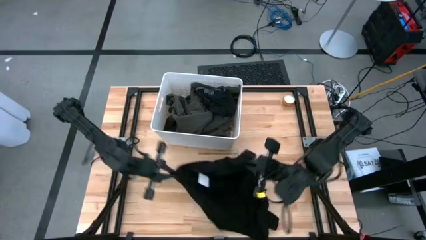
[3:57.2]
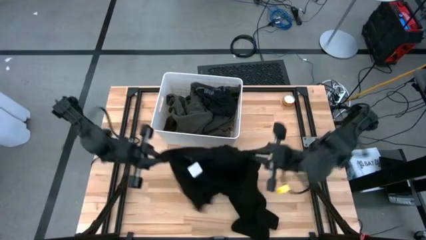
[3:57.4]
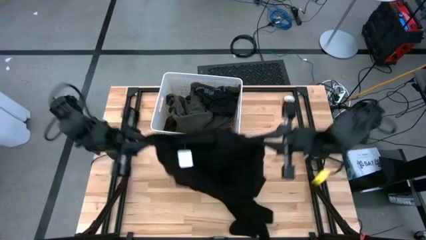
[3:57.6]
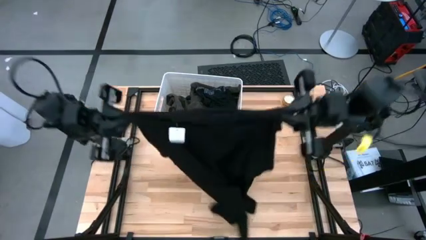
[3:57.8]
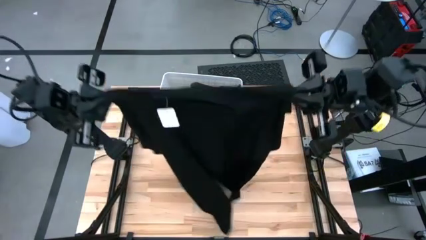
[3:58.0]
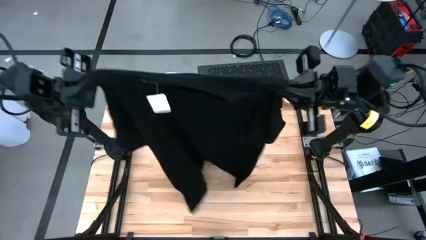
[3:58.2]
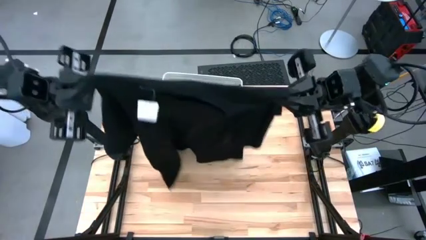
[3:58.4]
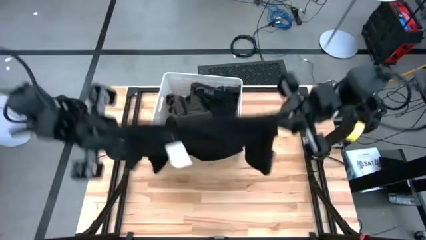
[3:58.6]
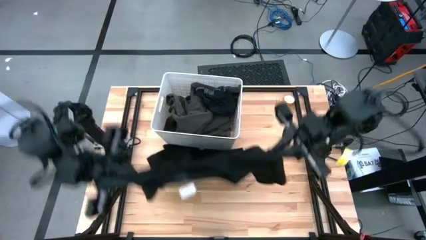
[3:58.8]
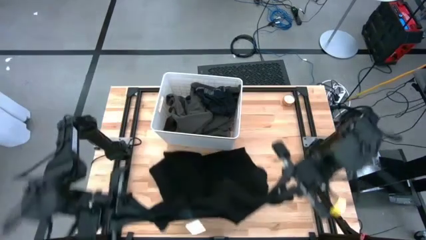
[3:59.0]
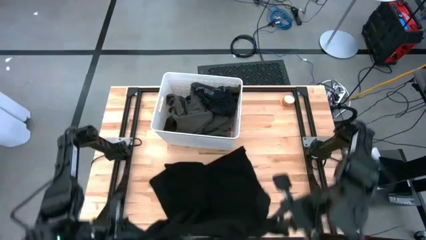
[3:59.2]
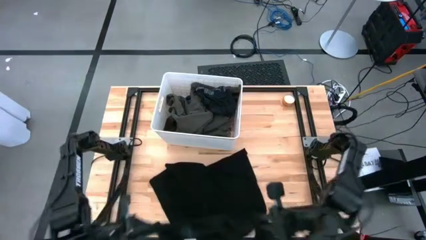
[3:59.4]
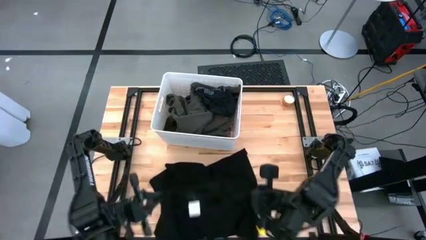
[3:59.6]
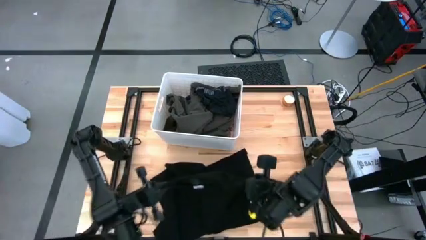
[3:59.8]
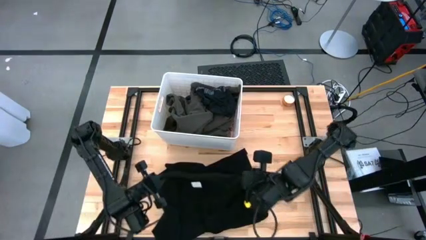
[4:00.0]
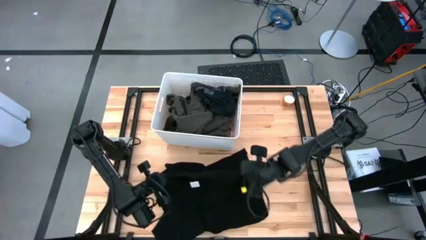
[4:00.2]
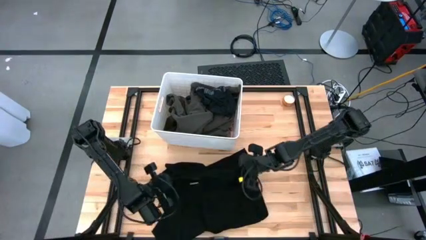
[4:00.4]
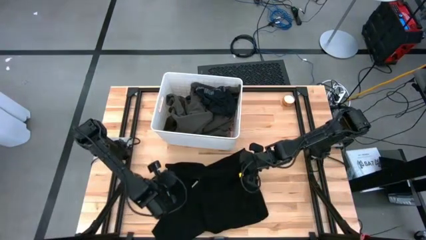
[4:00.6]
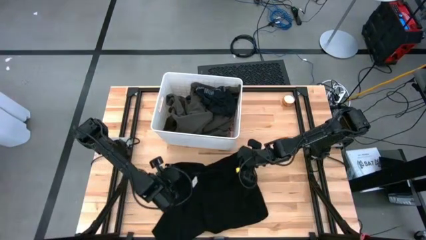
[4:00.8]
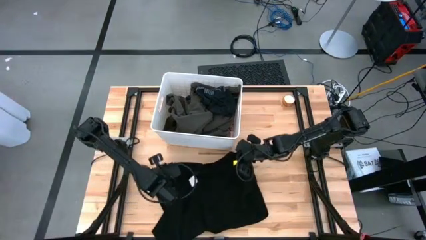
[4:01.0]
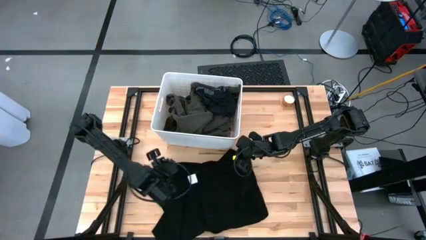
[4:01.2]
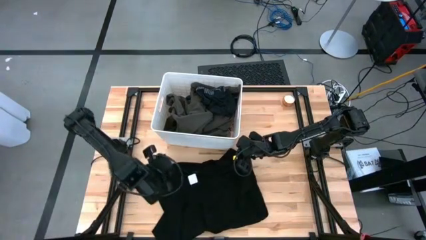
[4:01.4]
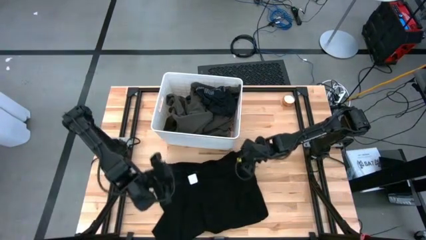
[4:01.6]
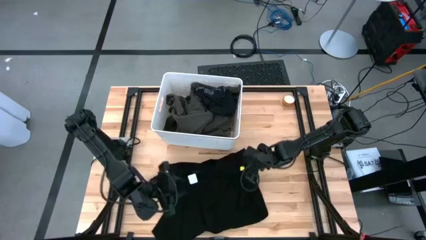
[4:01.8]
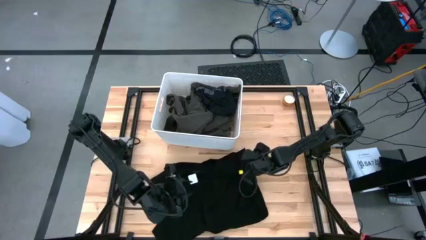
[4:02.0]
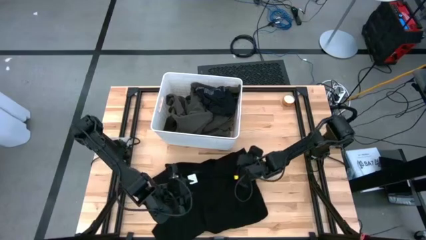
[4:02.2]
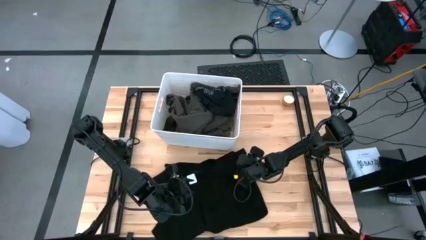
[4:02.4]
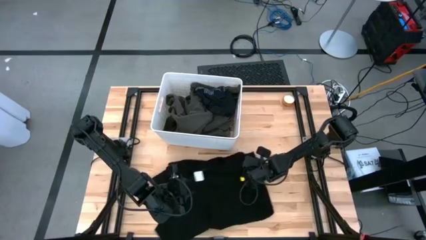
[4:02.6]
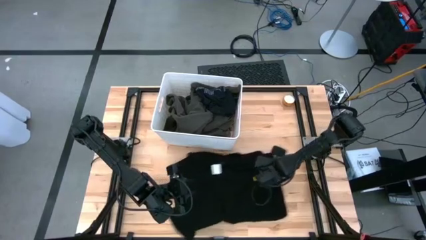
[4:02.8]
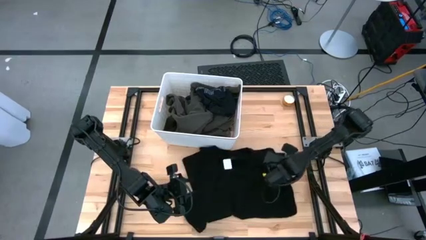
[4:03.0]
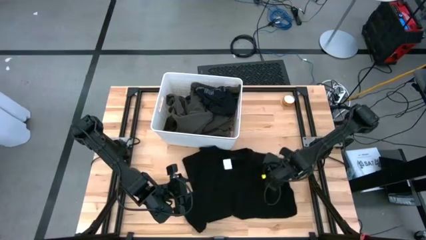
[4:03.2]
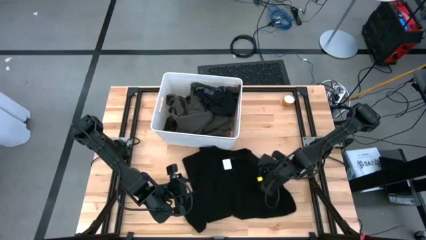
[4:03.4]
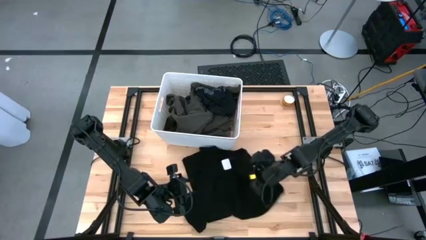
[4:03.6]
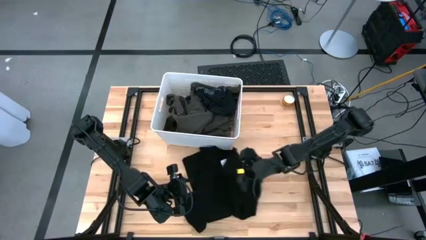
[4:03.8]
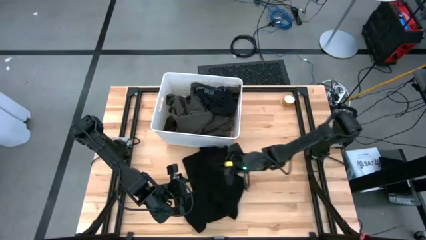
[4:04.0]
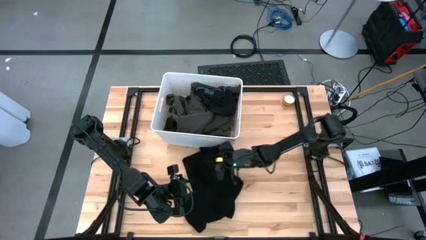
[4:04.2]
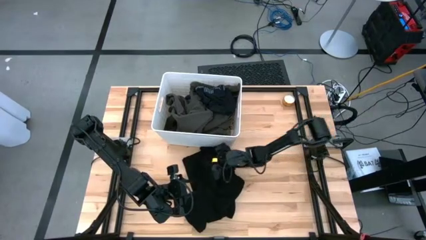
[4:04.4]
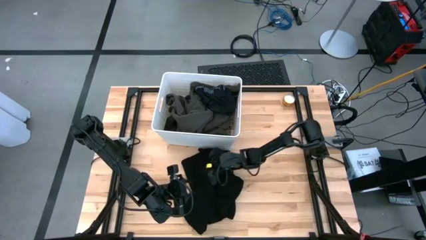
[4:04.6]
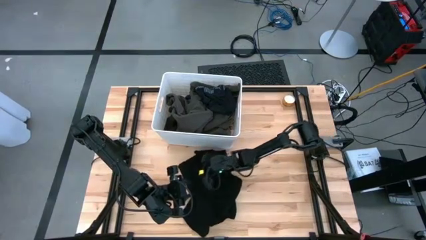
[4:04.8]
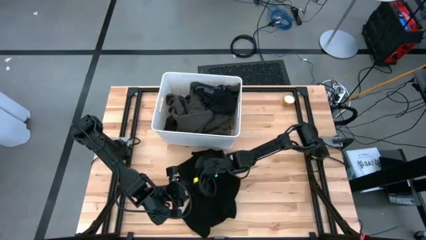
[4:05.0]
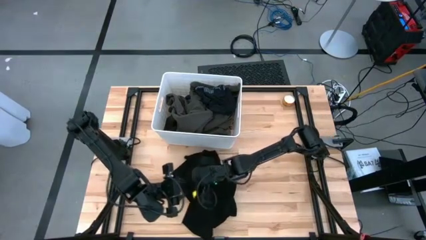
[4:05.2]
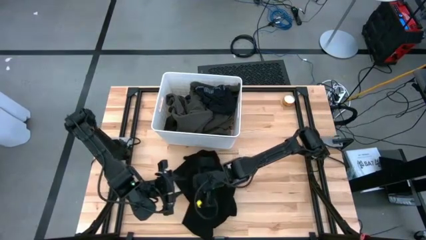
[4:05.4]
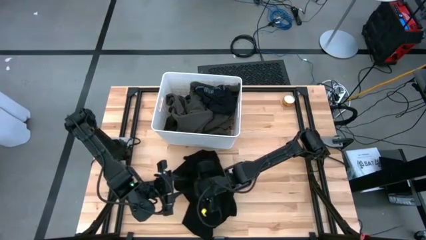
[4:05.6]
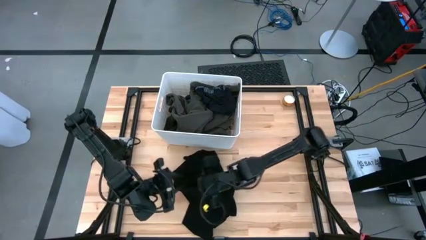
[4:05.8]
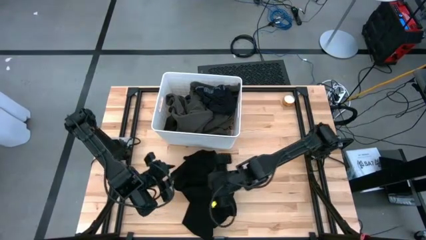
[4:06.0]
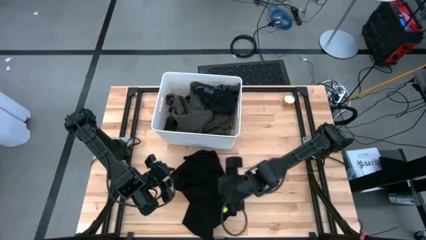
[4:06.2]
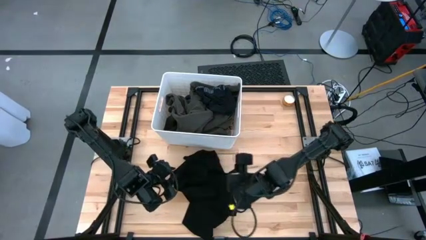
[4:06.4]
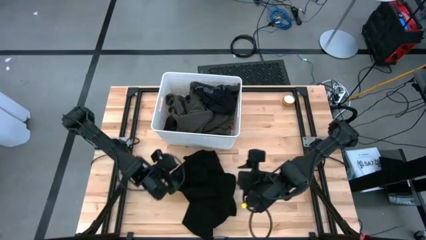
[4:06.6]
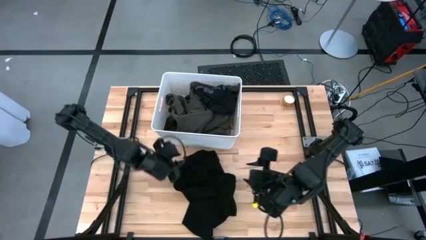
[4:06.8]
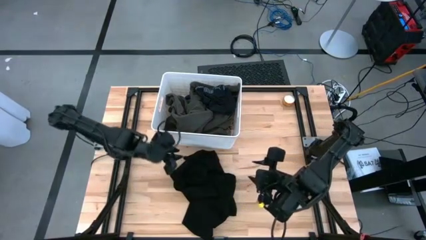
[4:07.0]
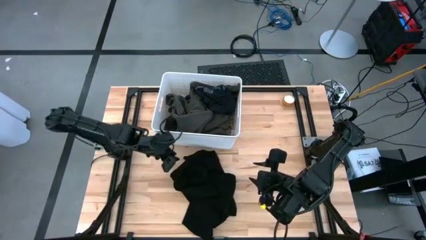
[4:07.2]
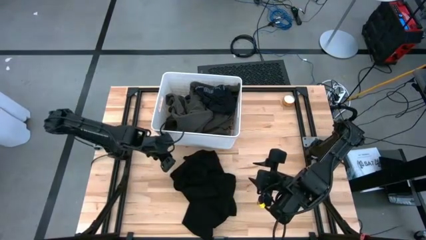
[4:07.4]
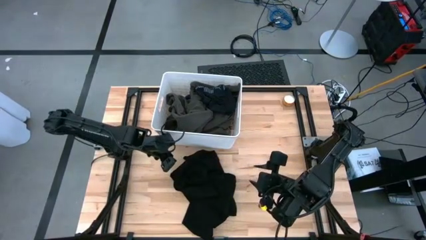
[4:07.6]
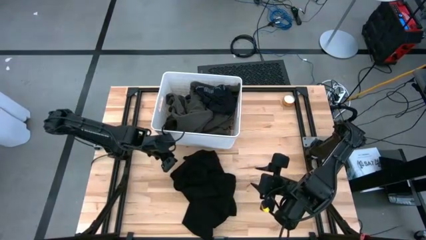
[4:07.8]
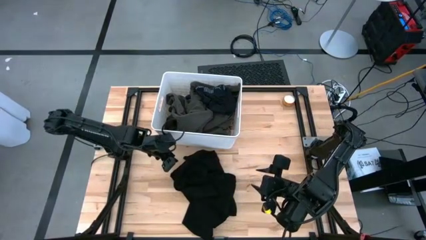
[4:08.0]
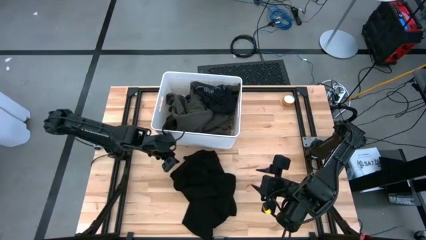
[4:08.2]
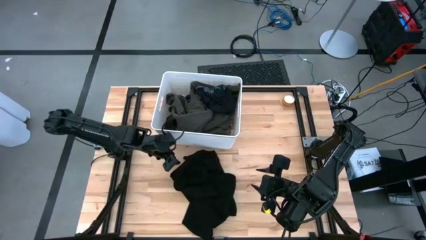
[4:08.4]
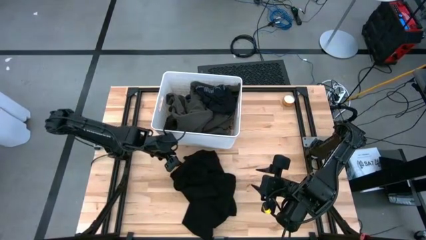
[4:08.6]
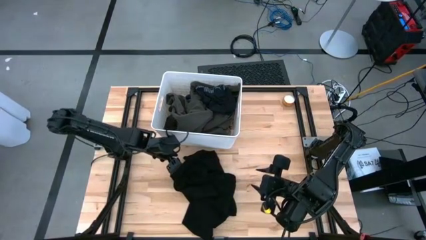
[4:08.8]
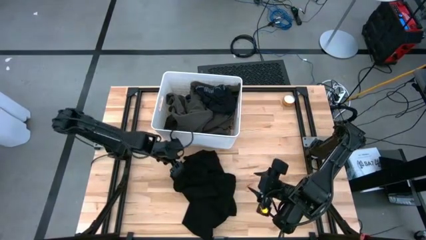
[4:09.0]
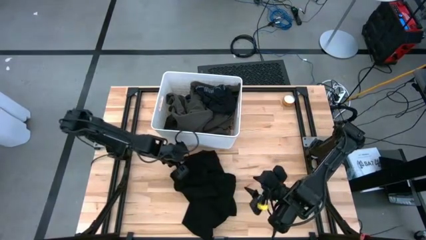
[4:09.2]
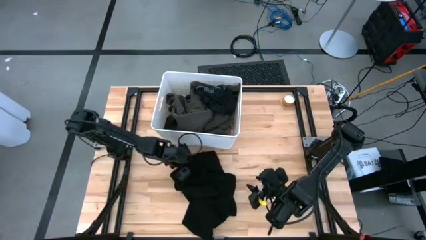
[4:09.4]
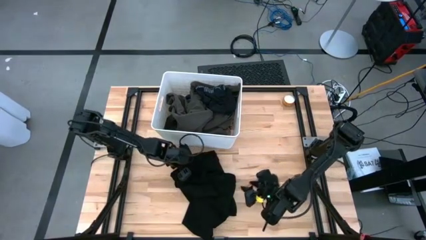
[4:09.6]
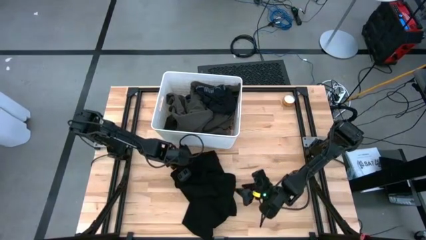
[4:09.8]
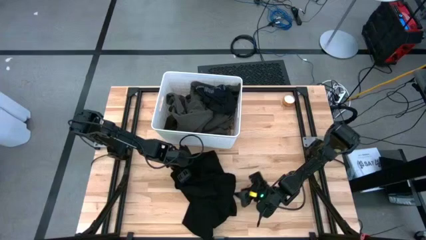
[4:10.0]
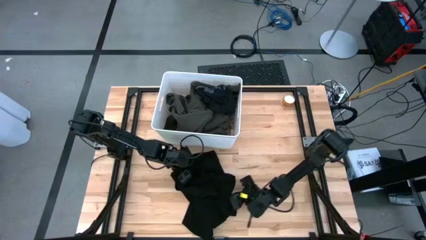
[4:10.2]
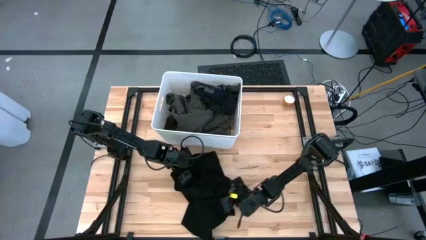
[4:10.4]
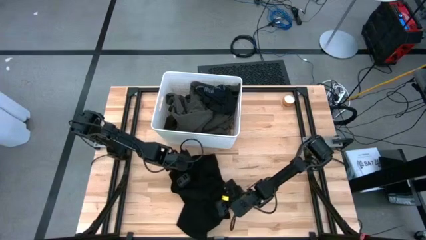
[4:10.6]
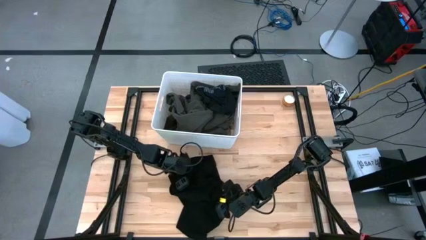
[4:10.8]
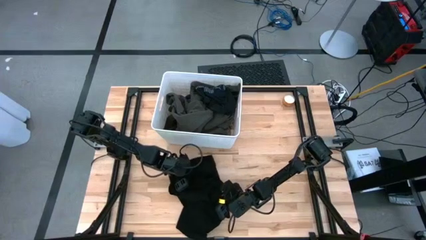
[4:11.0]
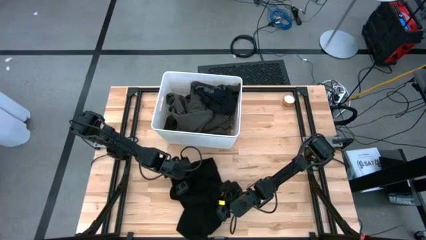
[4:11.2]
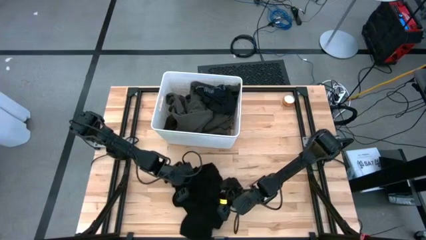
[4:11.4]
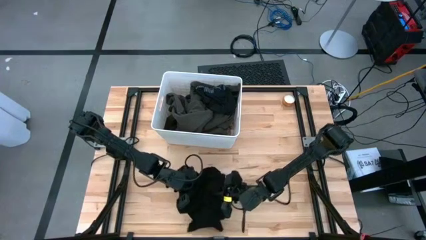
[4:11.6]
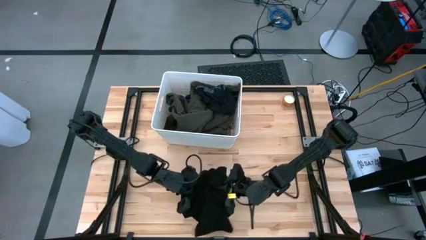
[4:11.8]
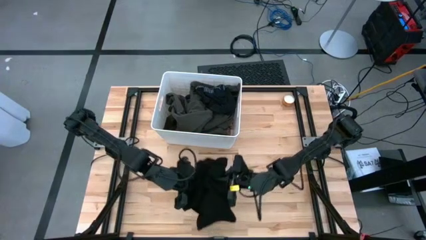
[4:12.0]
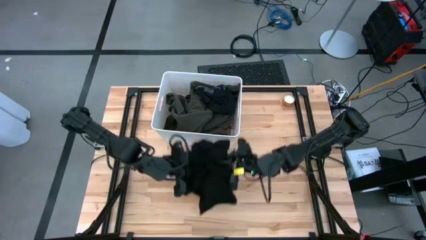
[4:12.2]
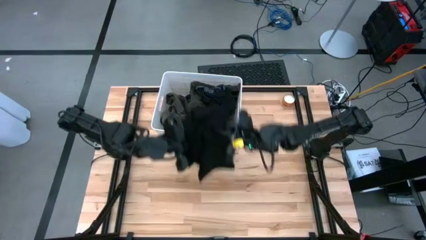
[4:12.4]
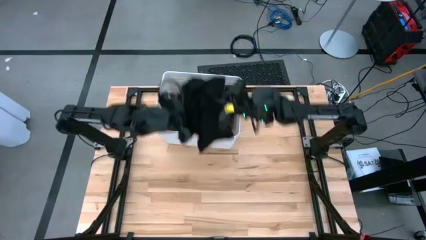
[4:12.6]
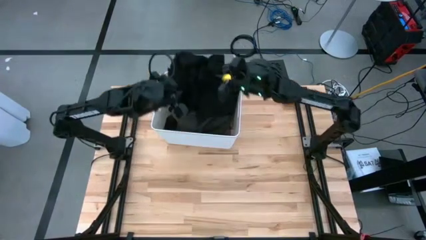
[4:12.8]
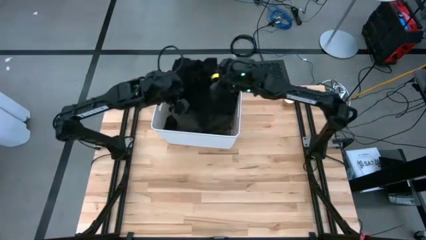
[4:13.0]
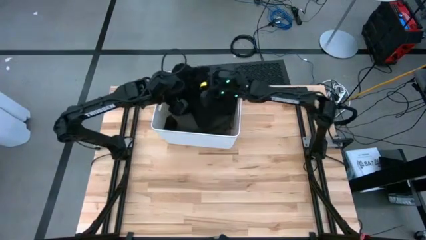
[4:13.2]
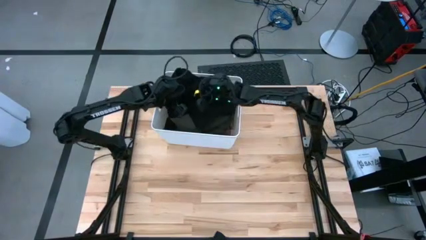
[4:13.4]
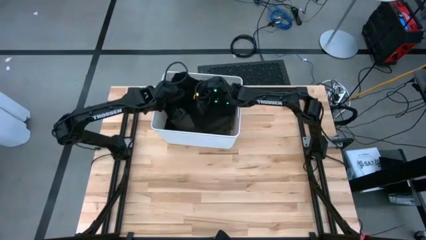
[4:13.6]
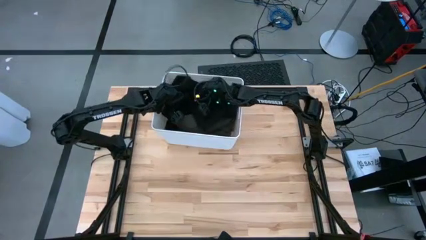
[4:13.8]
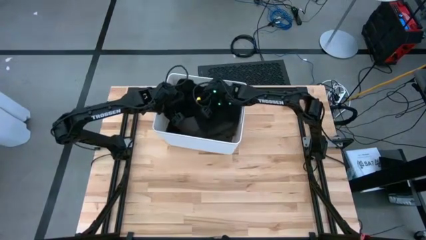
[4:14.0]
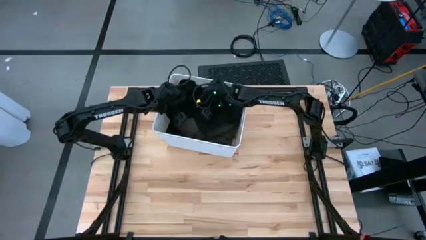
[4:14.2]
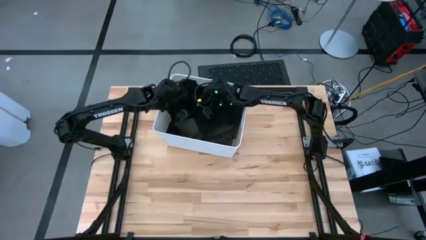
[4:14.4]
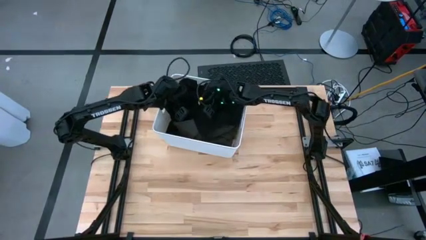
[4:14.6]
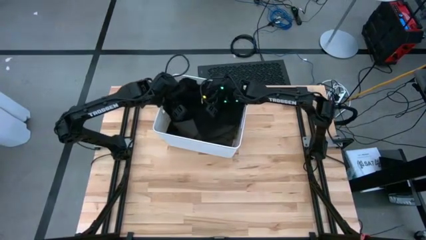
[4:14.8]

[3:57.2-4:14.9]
Task: Sort clothes
Put the black shirt into the white laundry bin
